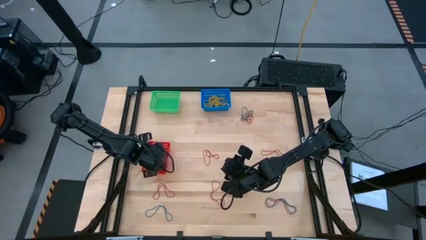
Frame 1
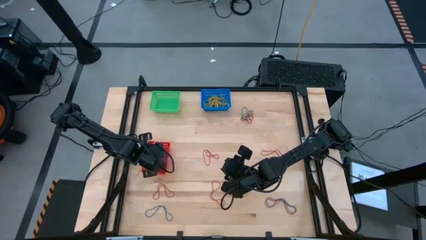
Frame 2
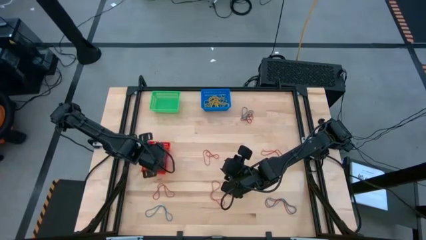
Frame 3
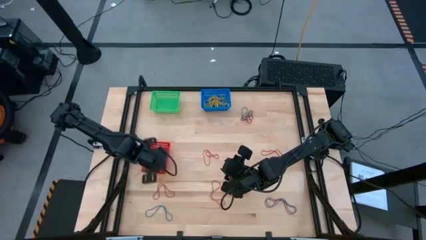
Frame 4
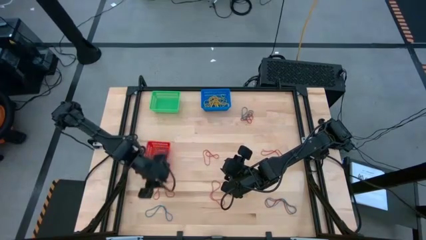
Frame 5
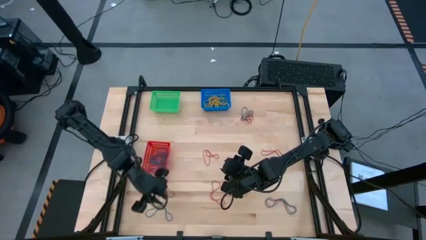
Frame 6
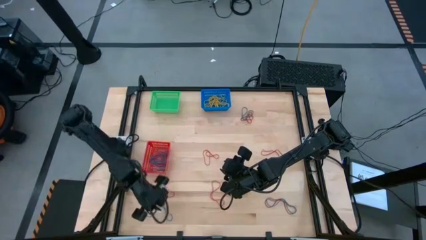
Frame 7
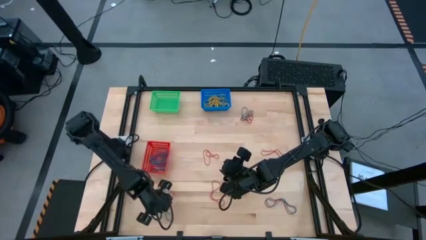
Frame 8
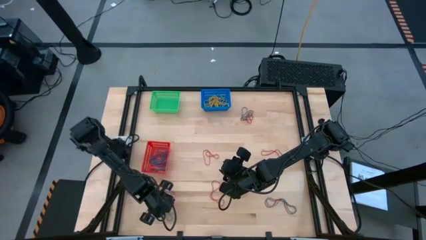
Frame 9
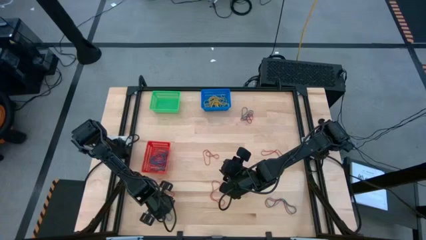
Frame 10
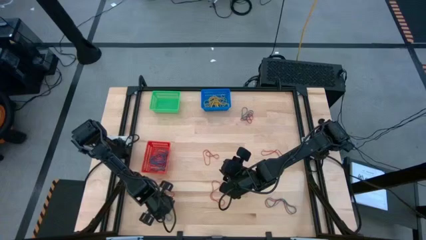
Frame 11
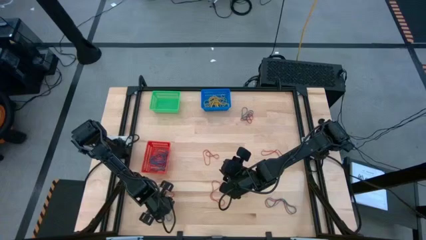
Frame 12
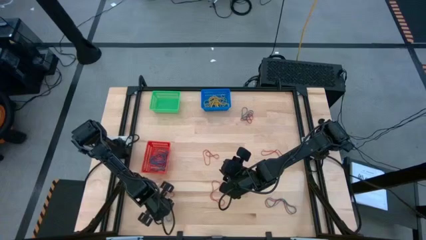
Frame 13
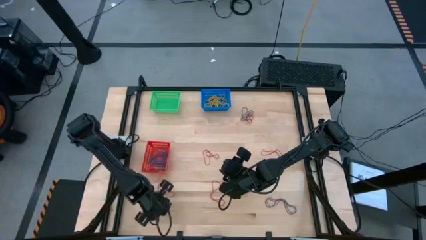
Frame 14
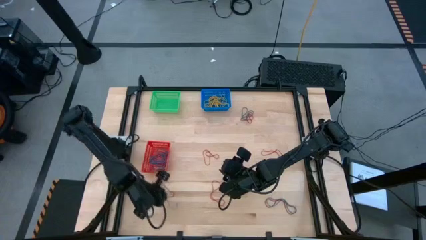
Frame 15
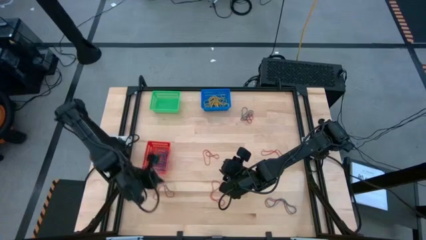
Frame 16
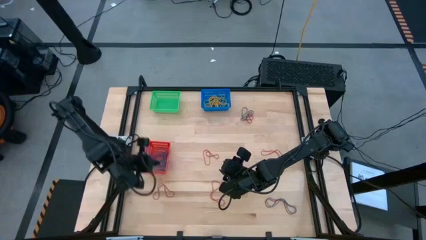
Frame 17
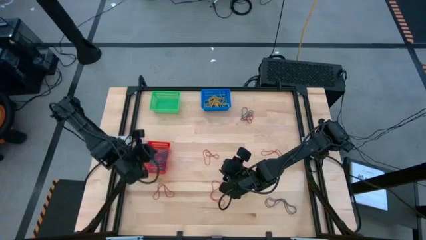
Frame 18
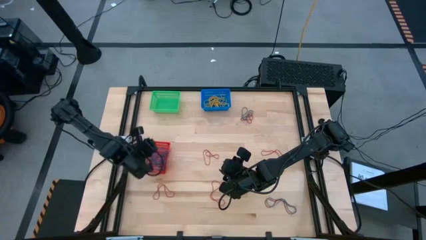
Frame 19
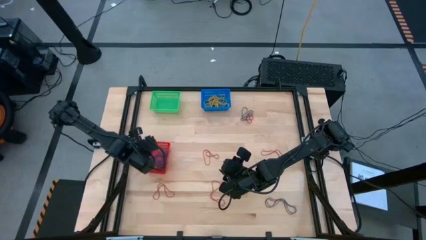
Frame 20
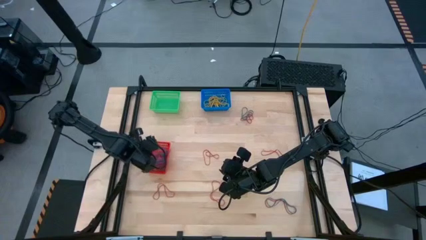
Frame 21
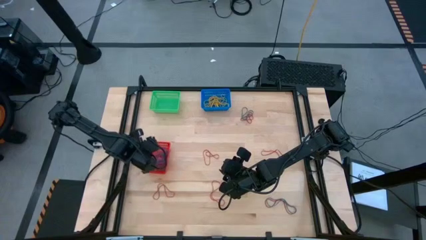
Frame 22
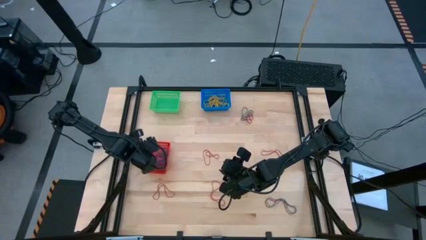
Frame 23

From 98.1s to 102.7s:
Task: Sort rubber bands into baskets
Put the blue rubber band into the red bin

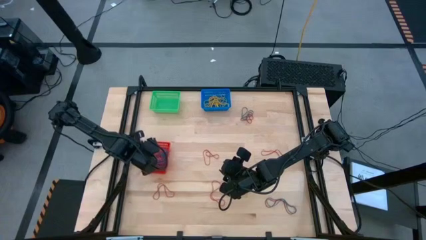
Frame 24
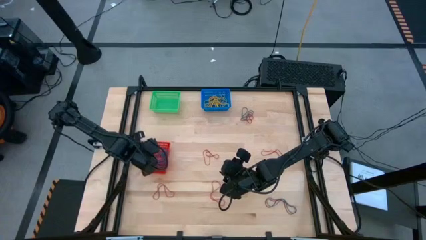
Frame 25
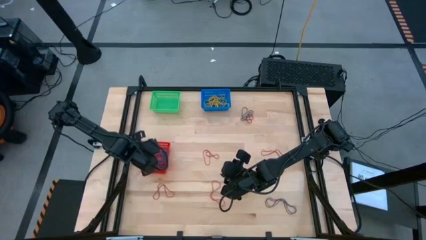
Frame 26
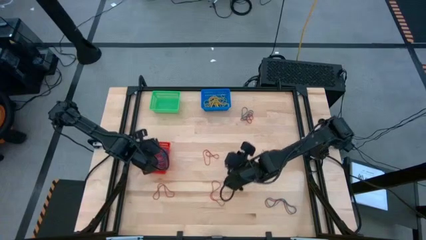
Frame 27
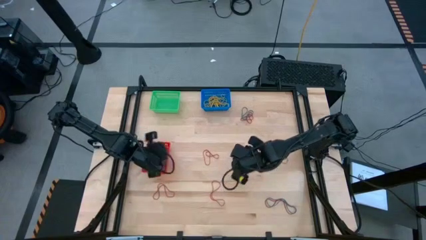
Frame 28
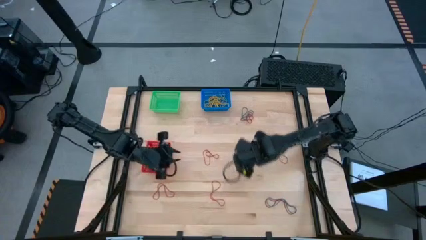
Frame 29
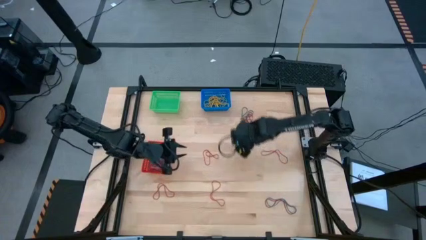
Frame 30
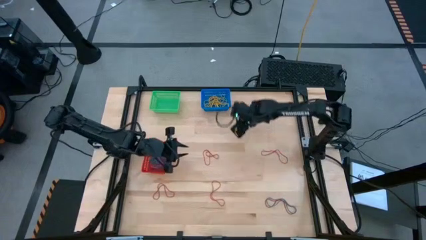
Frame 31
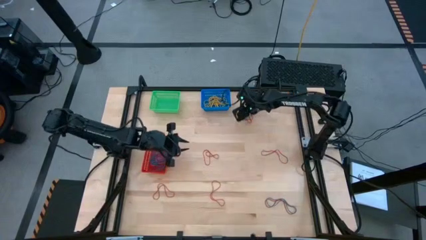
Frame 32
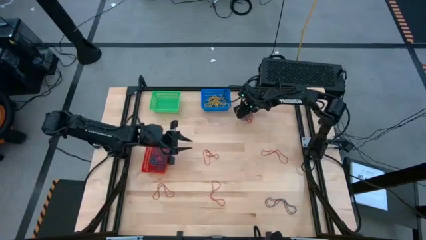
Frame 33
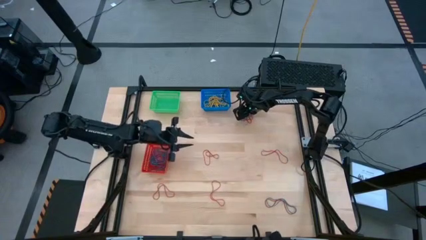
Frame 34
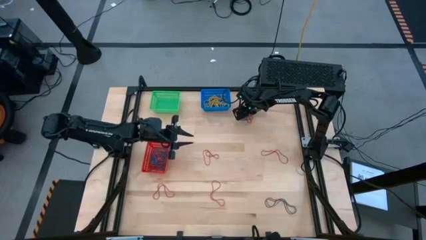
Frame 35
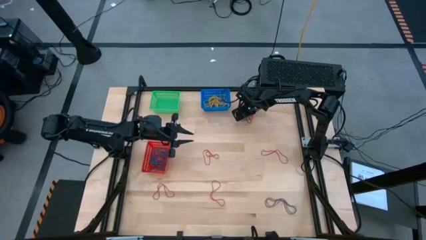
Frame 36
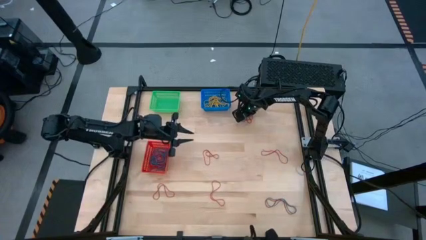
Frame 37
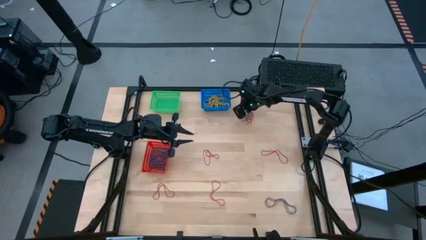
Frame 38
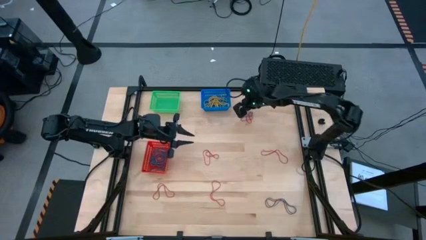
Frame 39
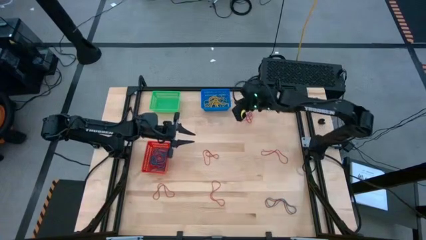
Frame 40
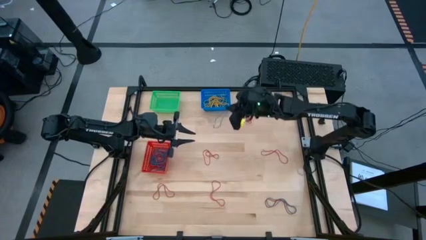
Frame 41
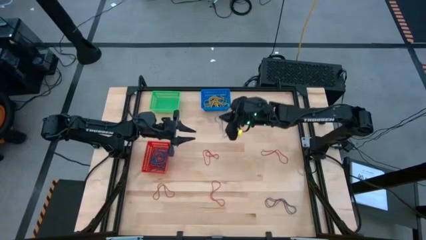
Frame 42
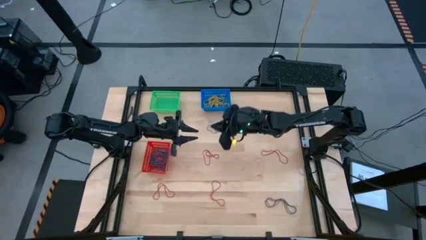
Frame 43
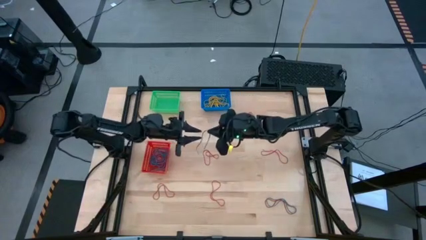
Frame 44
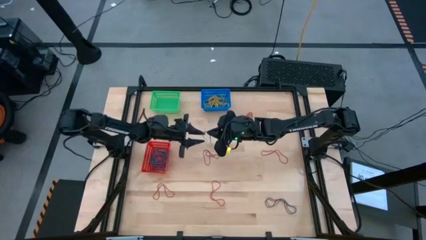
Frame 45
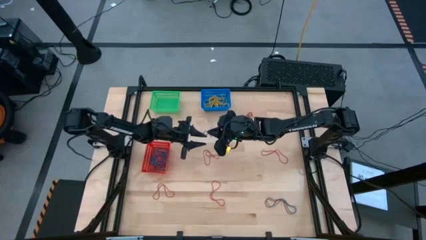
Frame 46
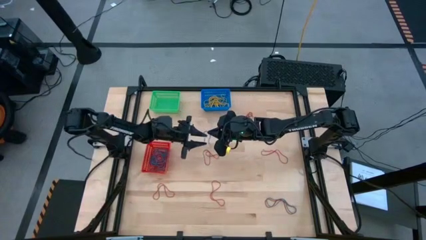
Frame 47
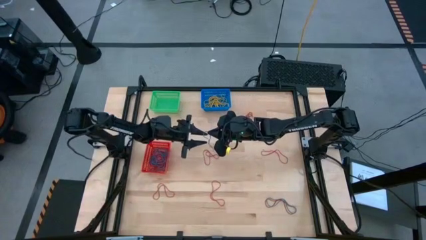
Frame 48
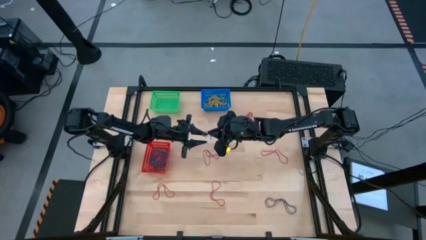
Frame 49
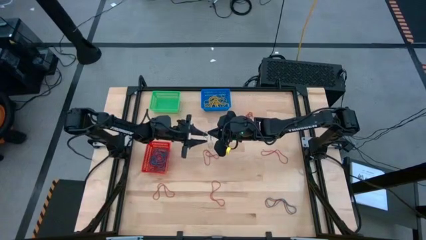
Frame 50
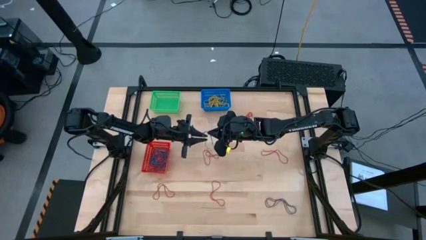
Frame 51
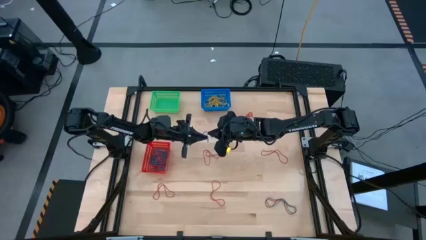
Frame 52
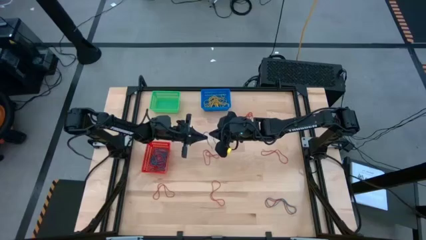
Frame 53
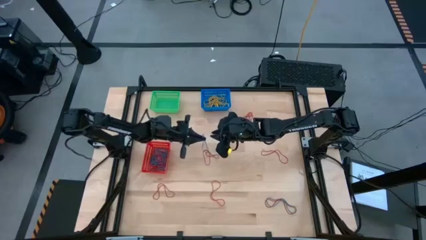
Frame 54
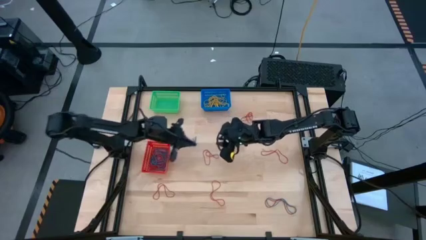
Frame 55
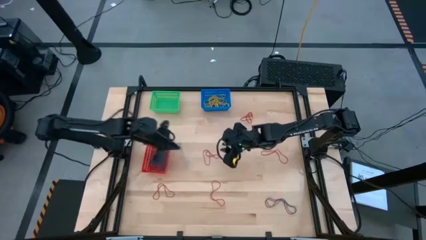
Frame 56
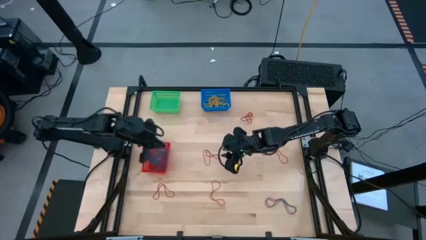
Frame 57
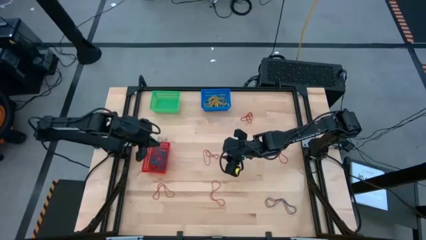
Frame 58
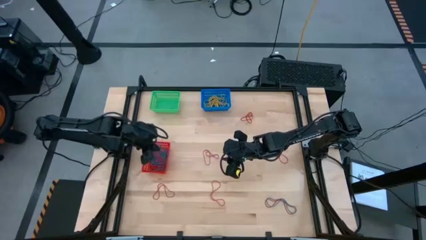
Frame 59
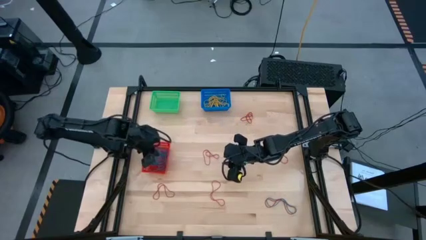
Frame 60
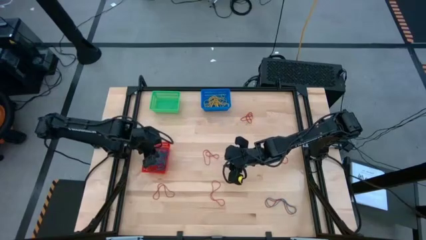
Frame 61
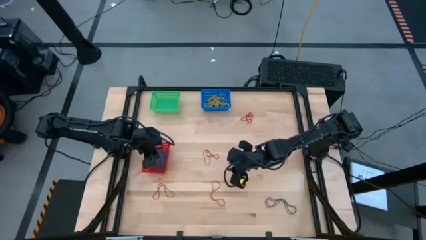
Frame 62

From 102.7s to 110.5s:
Put the blue rubber band into the red bin

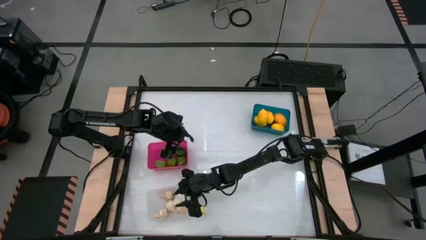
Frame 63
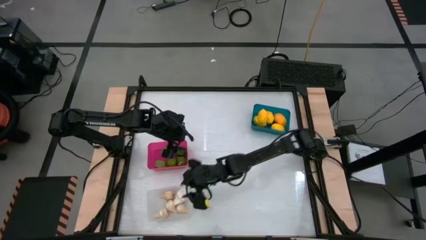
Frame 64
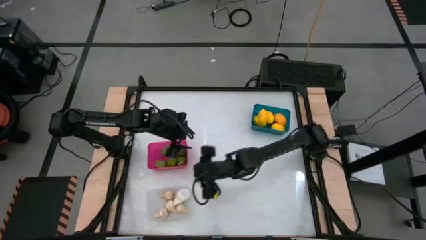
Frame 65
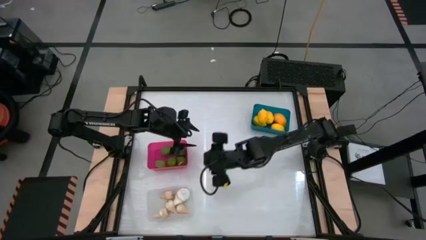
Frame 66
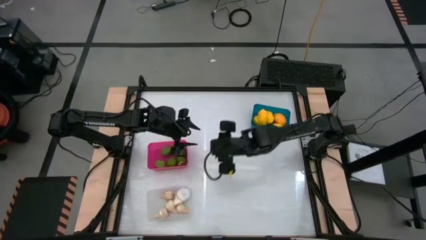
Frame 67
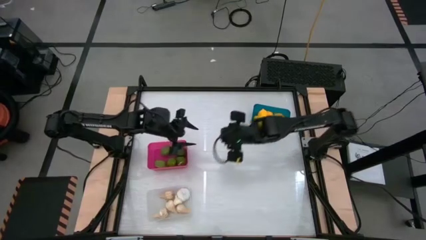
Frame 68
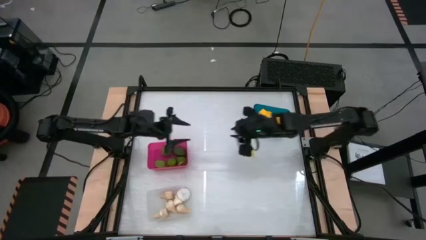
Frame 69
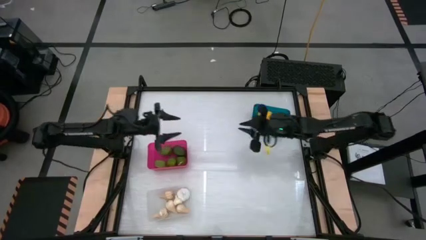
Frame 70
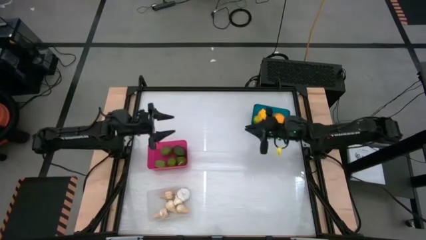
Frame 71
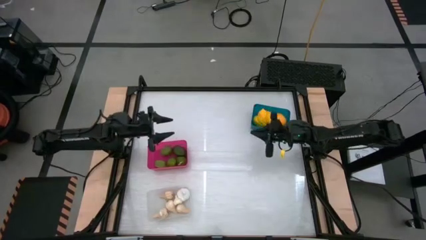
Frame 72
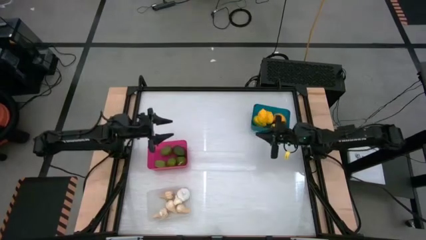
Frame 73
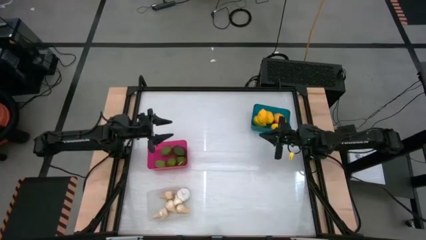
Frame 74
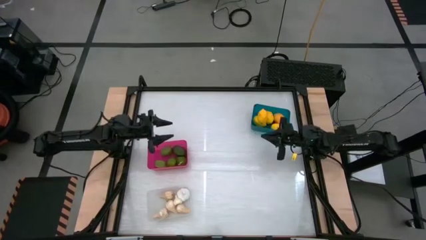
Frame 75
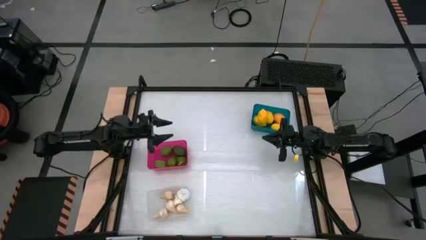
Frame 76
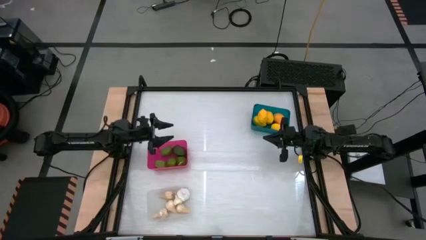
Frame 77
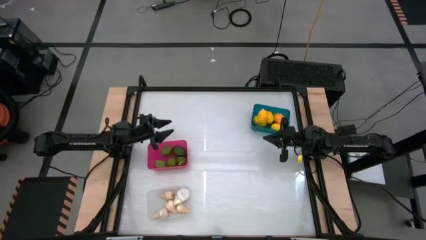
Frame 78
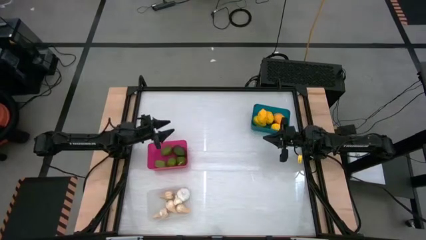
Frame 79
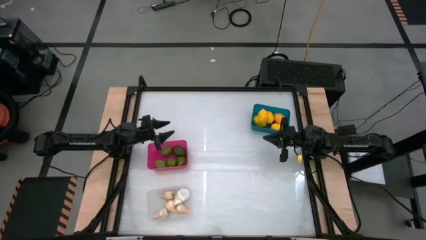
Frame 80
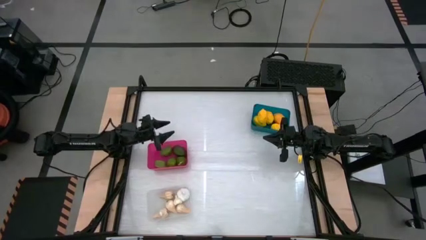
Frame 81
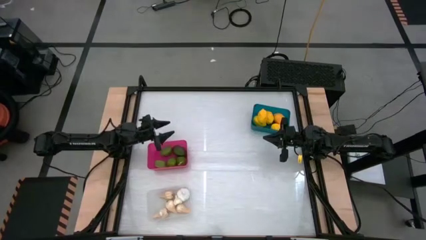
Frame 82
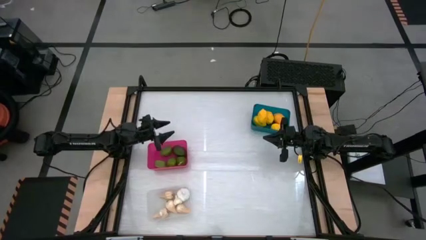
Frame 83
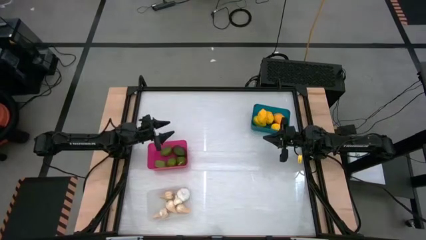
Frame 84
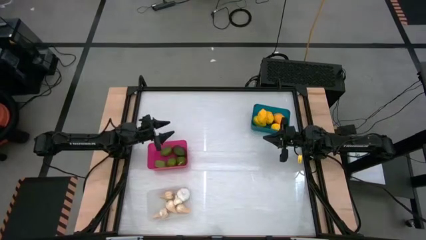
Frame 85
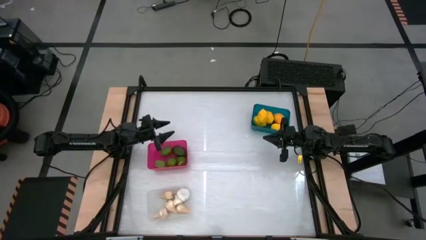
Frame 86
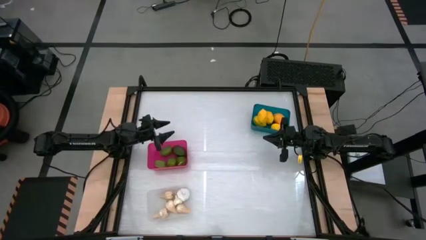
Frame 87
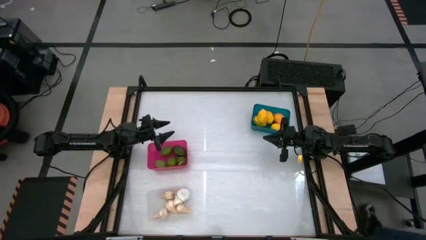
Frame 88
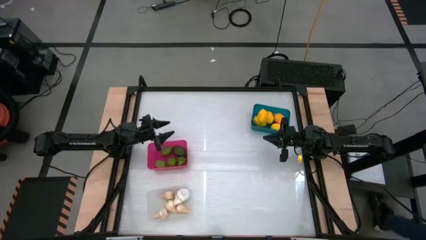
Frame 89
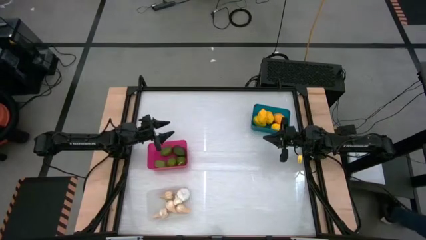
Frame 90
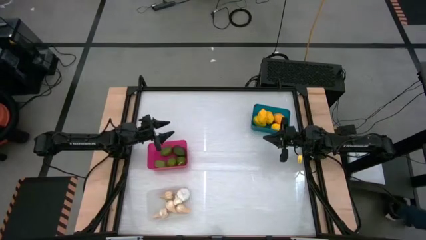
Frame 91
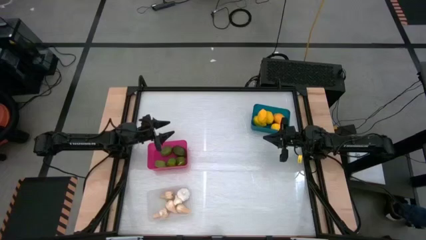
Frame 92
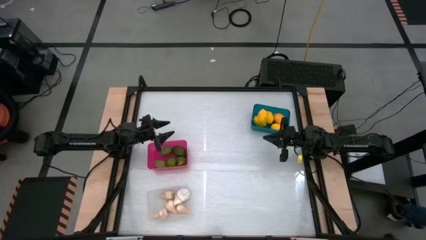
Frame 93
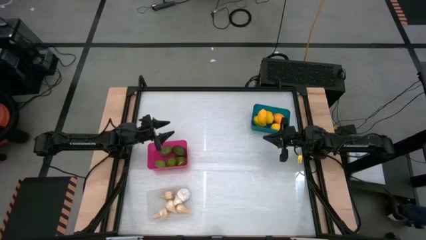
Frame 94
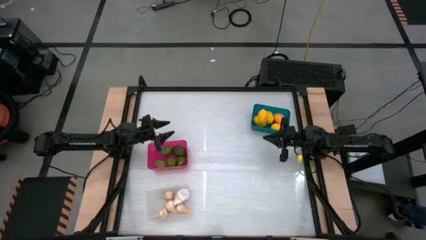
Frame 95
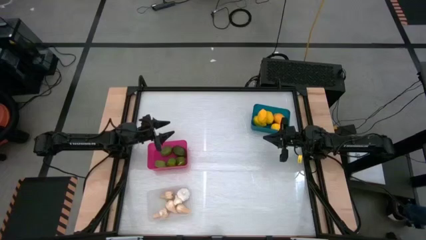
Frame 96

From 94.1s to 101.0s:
Task: Sort produce into baskets
Return to Home Position
